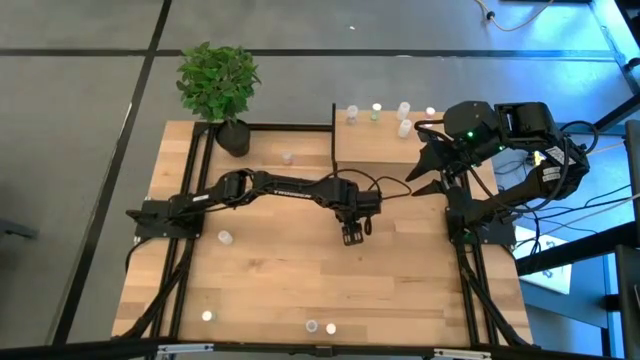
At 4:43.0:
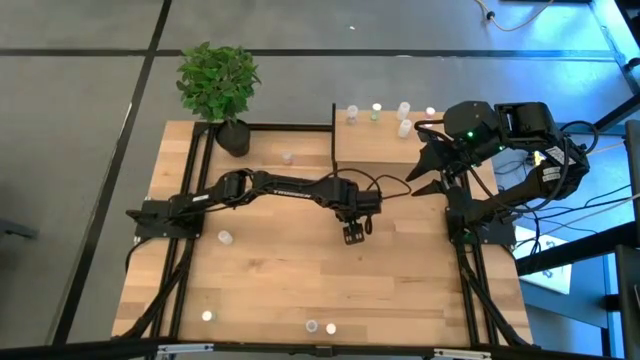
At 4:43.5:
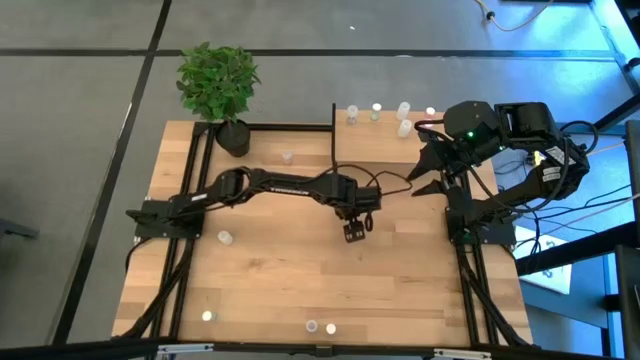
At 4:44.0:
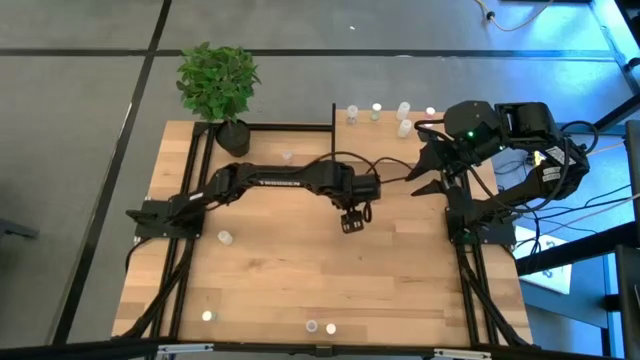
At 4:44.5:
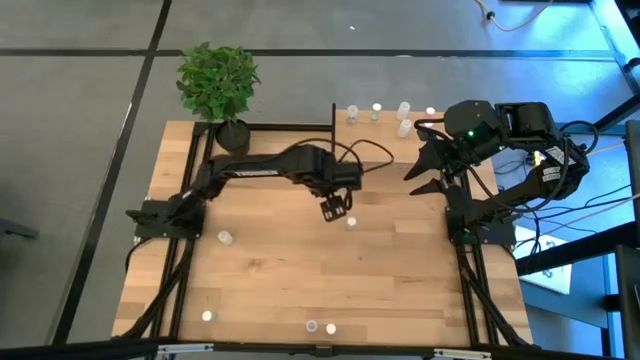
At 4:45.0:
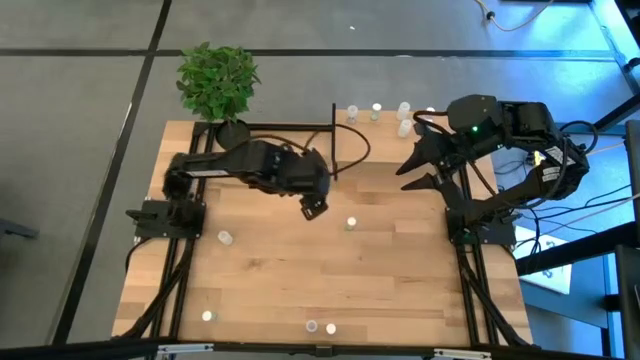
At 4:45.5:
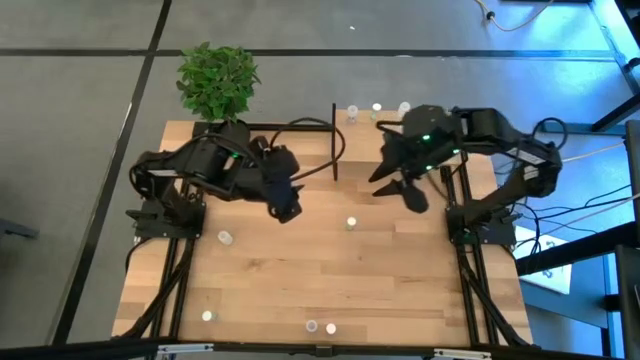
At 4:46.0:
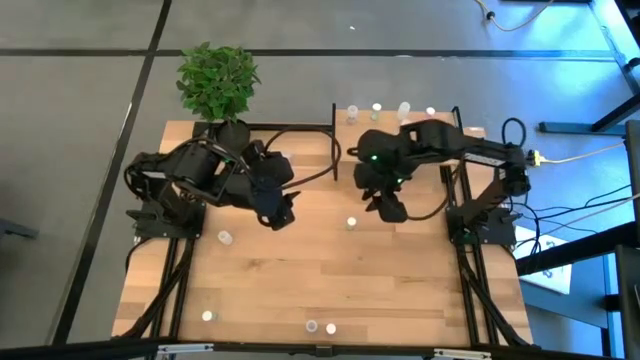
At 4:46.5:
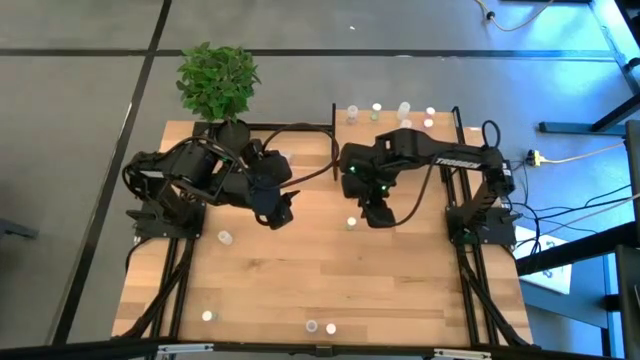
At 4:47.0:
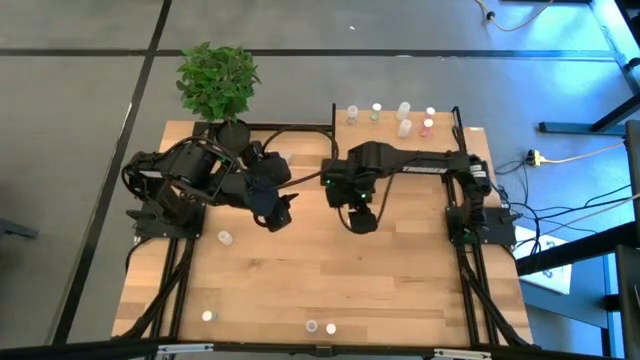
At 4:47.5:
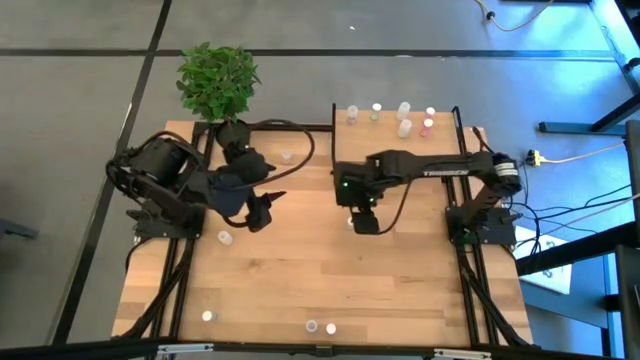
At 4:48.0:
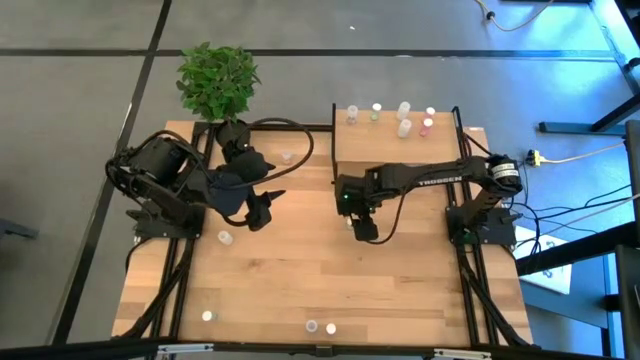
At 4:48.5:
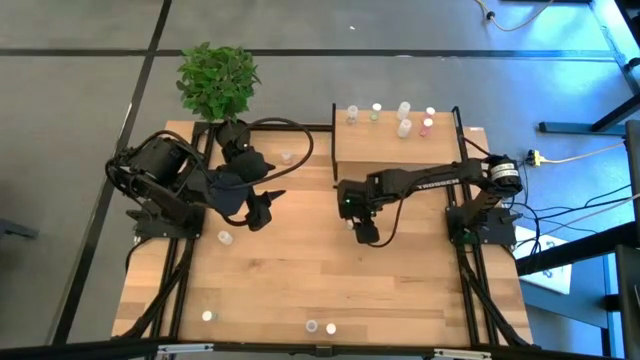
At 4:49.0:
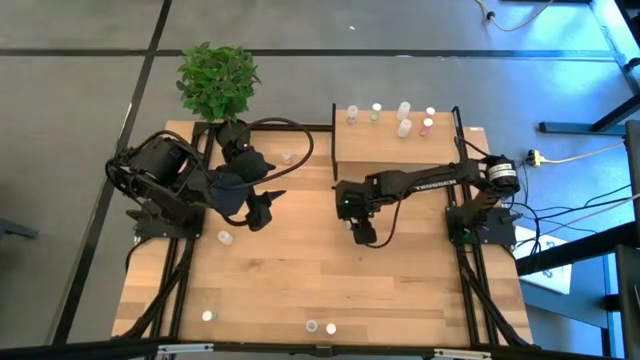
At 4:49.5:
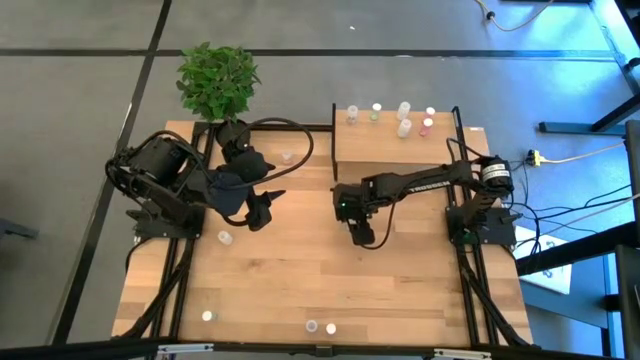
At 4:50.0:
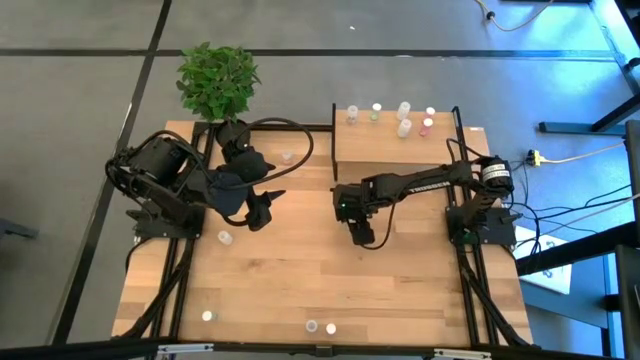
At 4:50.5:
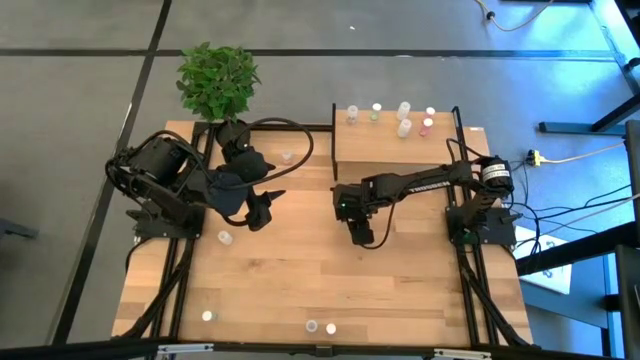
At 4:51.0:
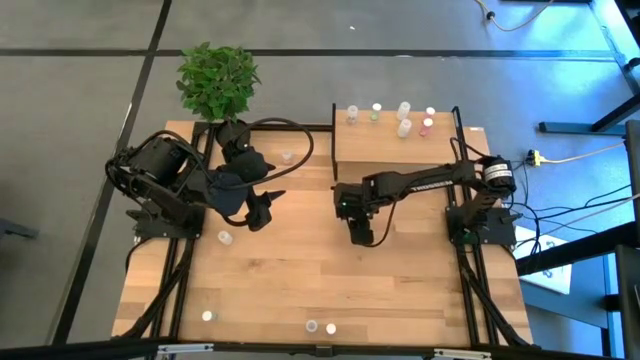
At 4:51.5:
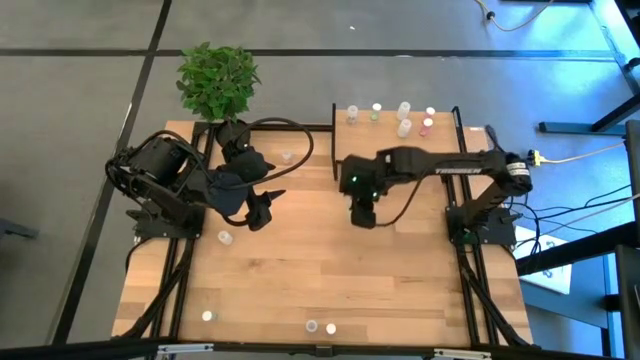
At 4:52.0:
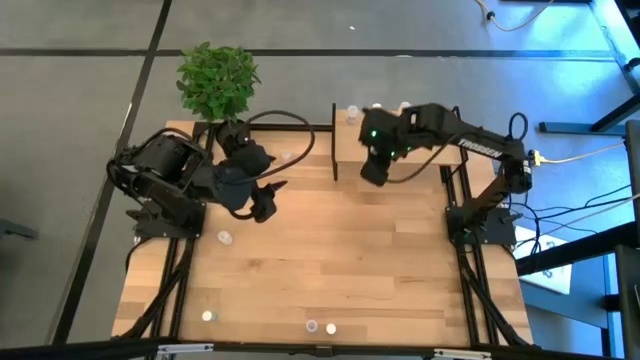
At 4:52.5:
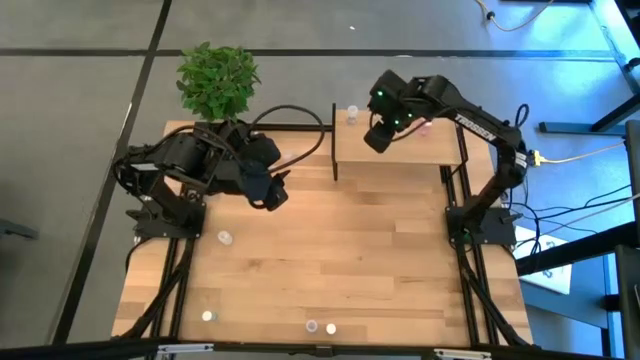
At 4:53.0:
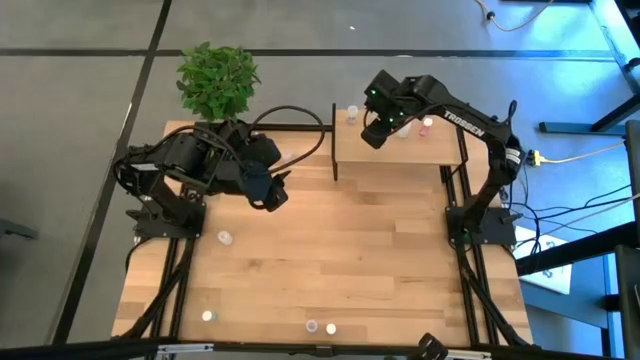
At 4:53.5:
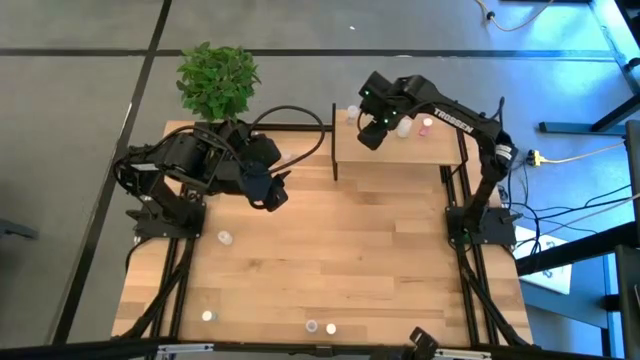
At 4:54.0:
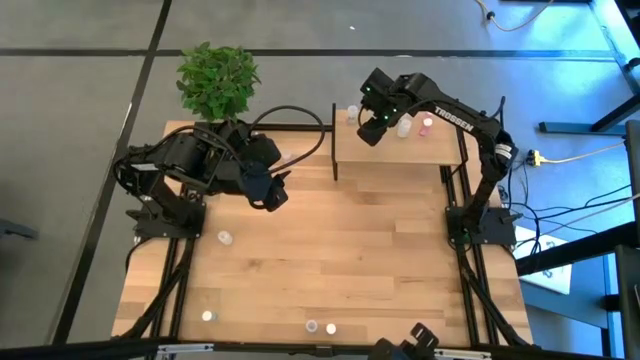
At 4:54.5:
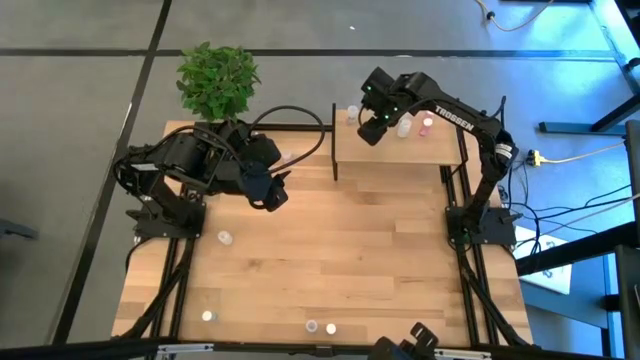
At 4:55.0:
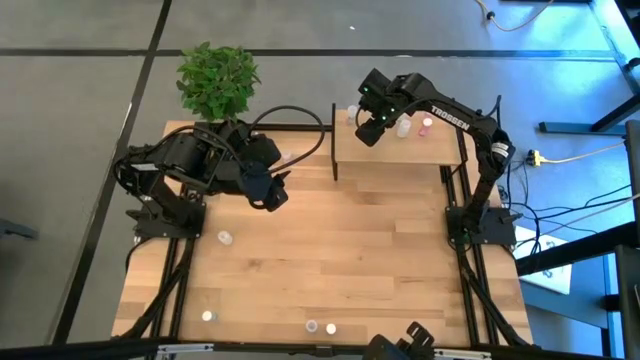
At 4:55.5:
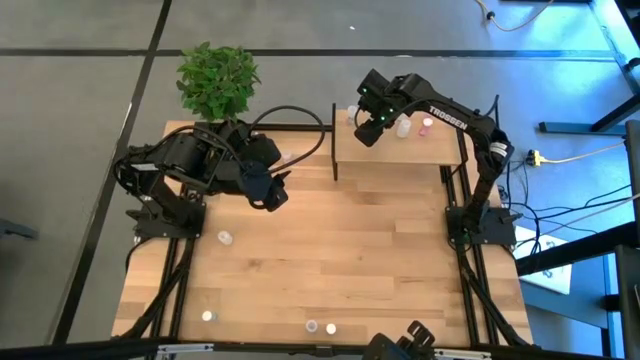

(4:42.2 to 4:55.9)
Task: Pick and place medicine bottles onto shelf by color
Put the top green pill bottle aligned with the other green pill bottle on the shelf
